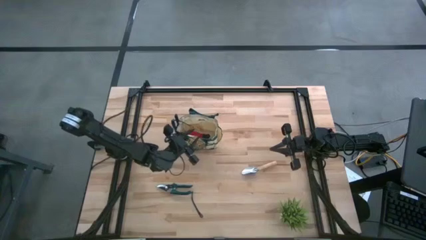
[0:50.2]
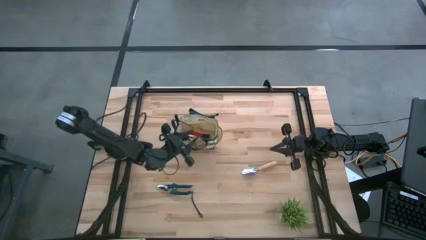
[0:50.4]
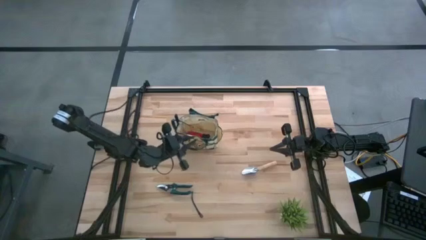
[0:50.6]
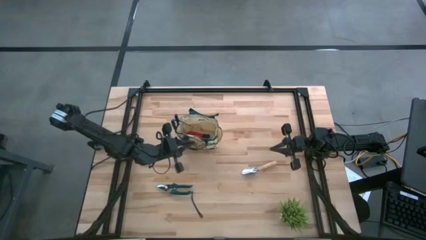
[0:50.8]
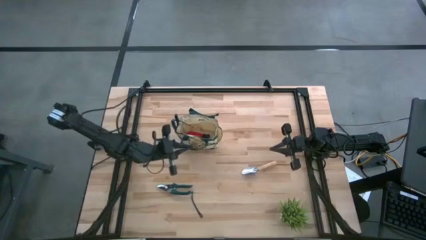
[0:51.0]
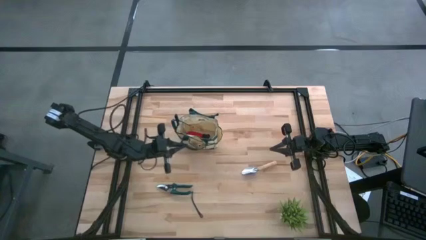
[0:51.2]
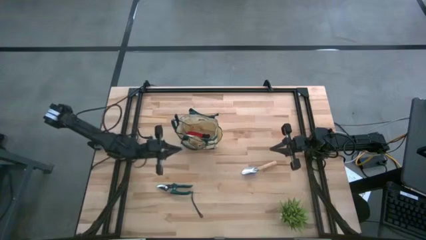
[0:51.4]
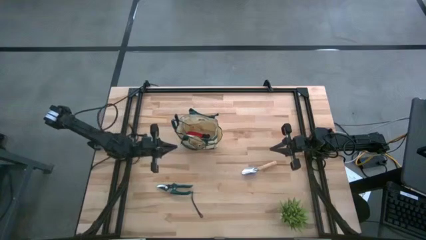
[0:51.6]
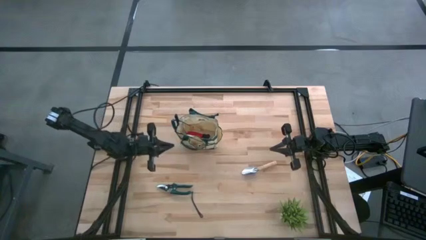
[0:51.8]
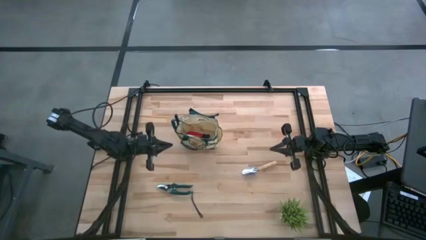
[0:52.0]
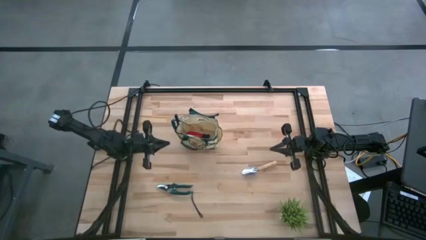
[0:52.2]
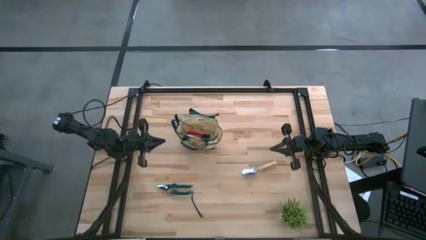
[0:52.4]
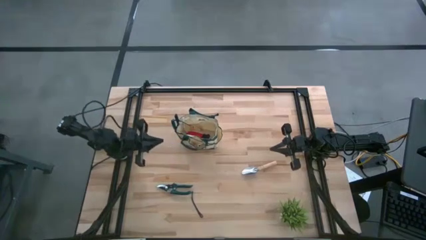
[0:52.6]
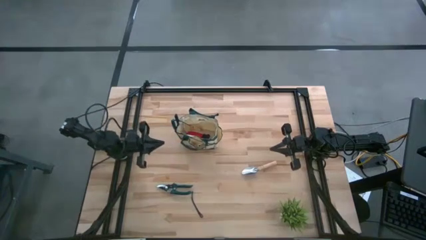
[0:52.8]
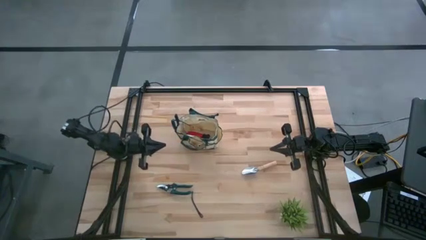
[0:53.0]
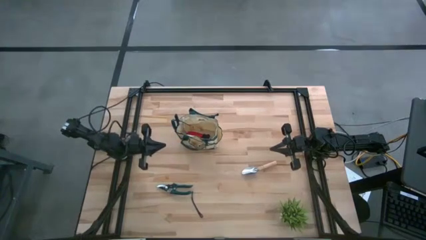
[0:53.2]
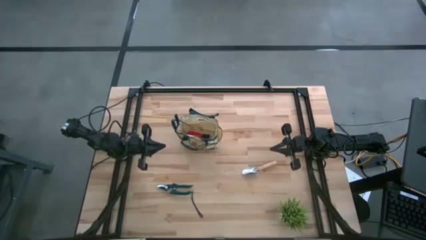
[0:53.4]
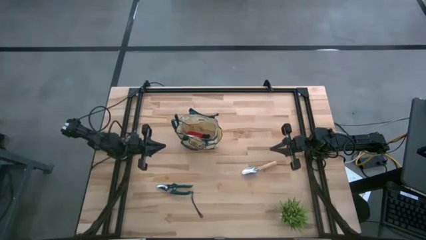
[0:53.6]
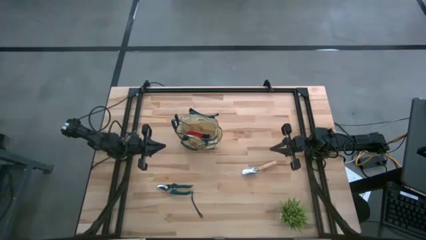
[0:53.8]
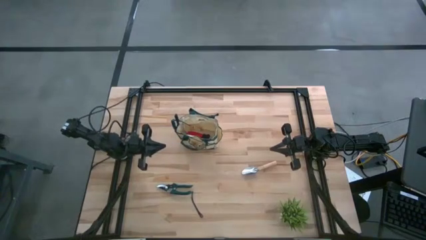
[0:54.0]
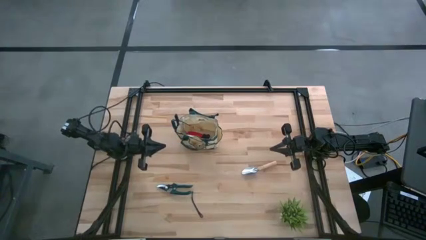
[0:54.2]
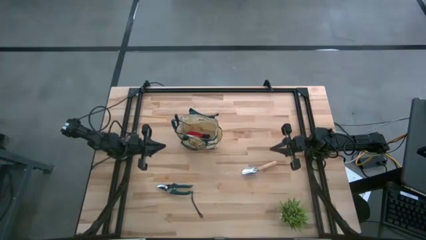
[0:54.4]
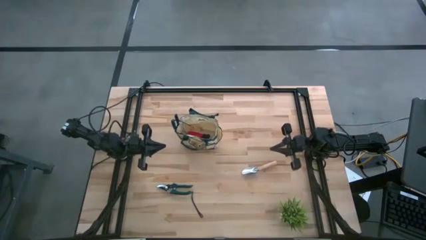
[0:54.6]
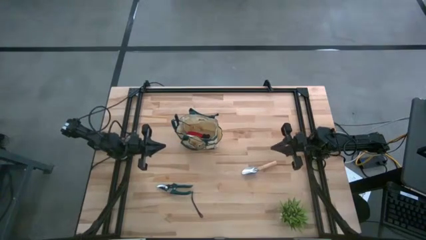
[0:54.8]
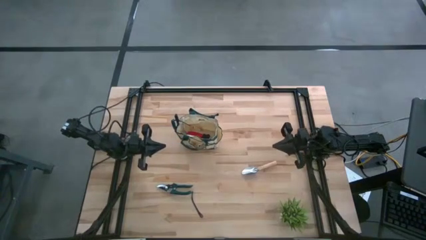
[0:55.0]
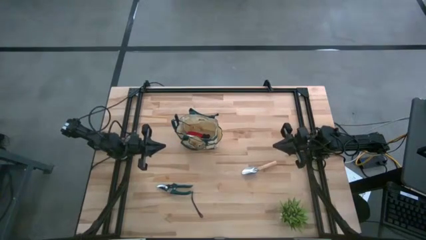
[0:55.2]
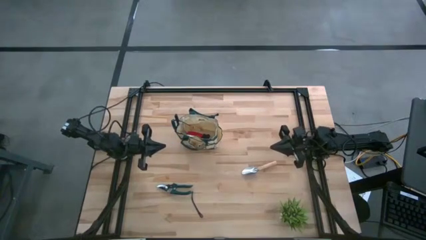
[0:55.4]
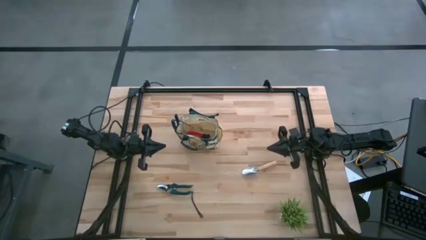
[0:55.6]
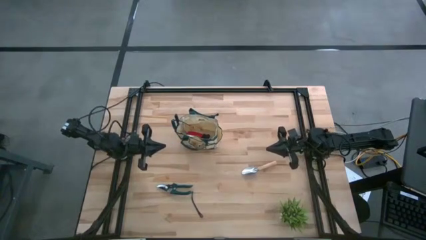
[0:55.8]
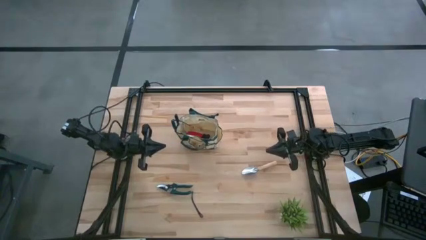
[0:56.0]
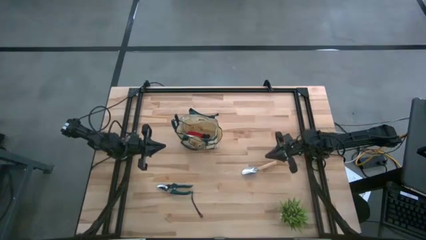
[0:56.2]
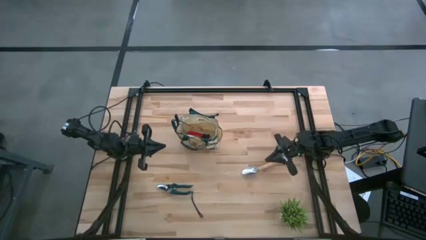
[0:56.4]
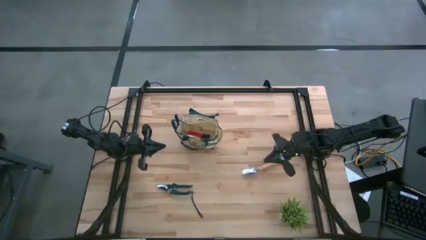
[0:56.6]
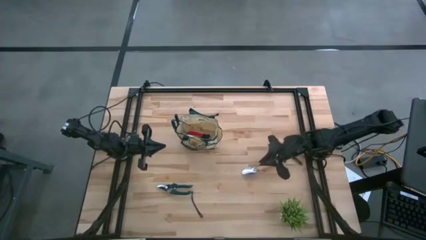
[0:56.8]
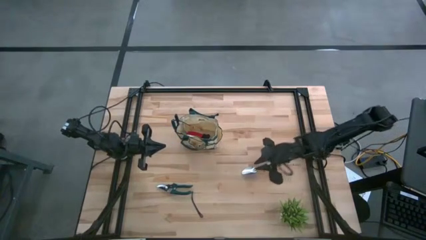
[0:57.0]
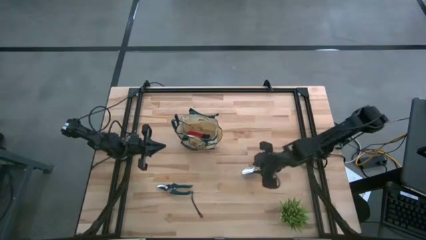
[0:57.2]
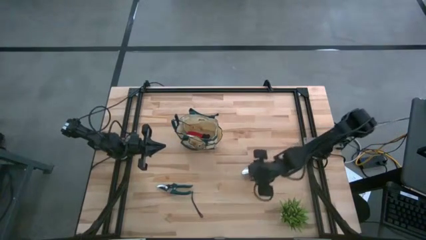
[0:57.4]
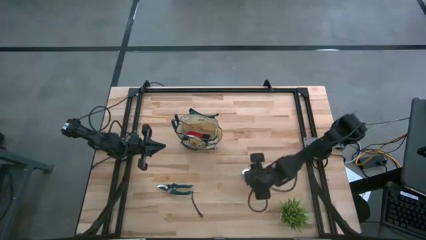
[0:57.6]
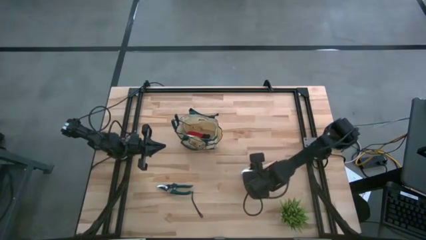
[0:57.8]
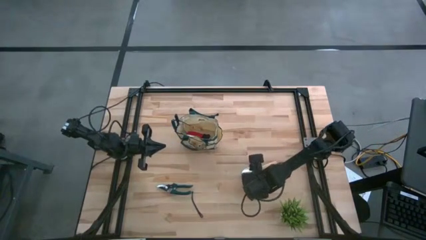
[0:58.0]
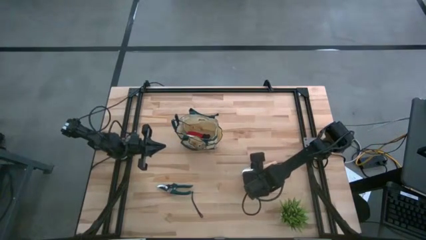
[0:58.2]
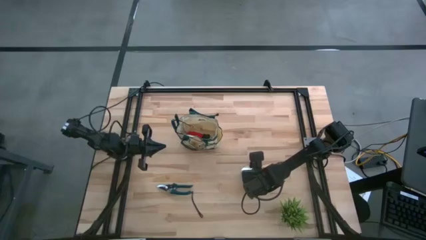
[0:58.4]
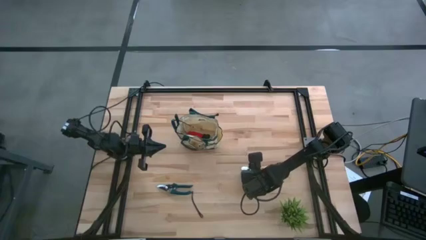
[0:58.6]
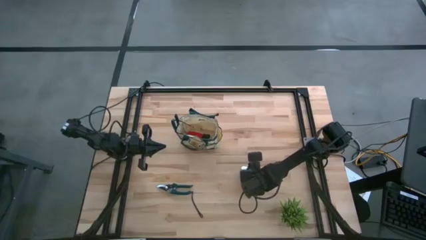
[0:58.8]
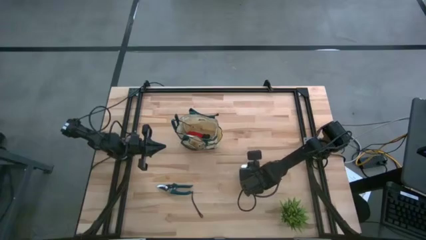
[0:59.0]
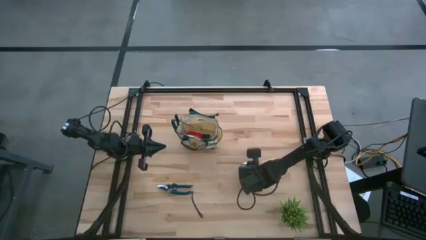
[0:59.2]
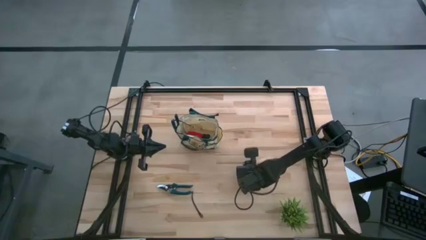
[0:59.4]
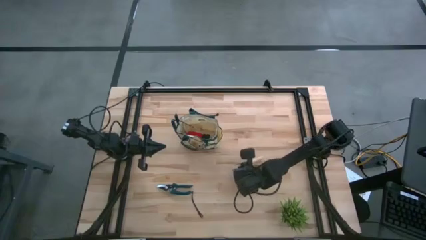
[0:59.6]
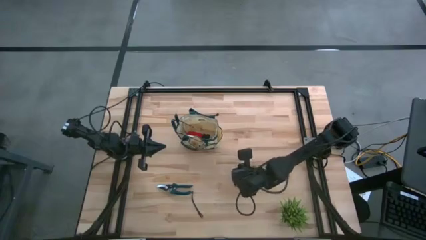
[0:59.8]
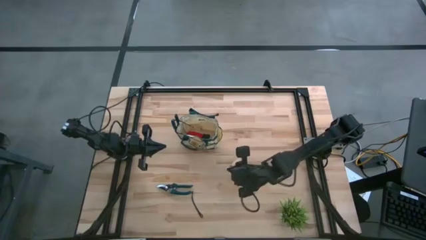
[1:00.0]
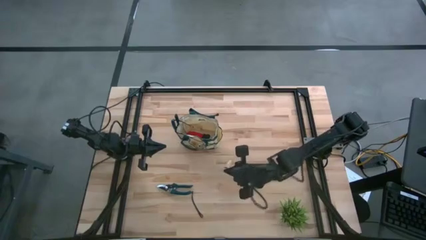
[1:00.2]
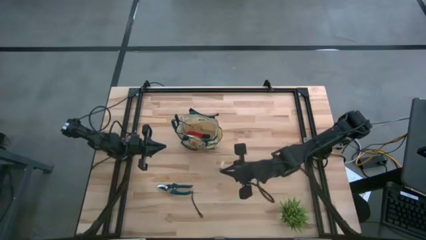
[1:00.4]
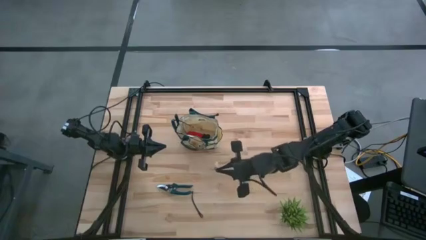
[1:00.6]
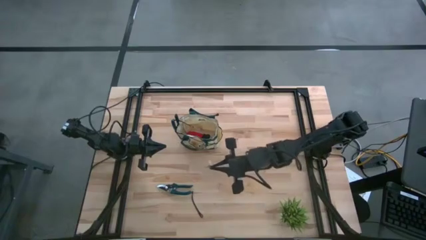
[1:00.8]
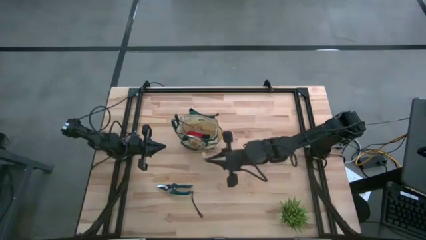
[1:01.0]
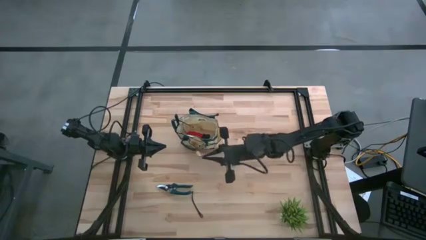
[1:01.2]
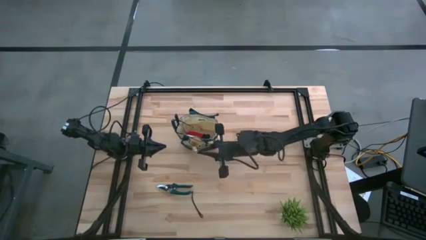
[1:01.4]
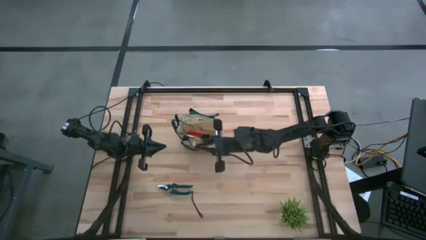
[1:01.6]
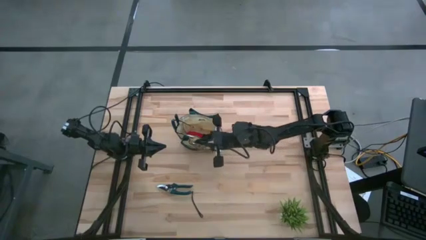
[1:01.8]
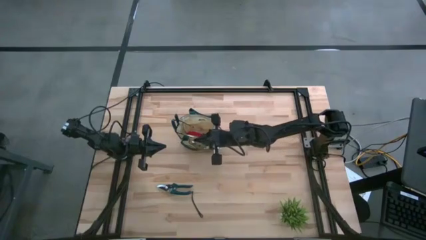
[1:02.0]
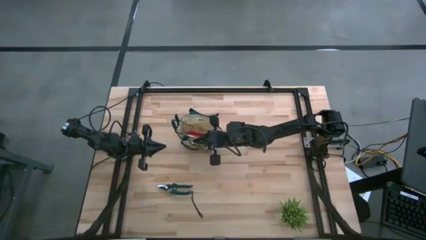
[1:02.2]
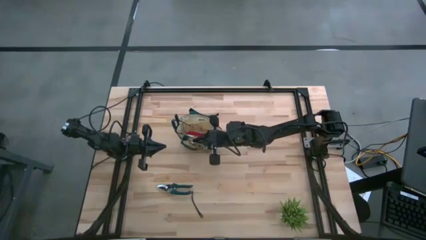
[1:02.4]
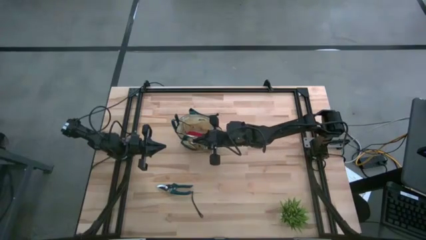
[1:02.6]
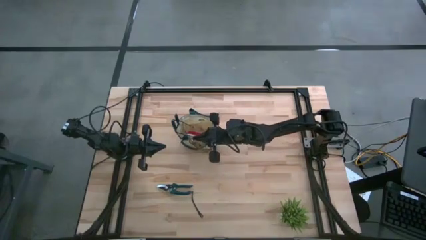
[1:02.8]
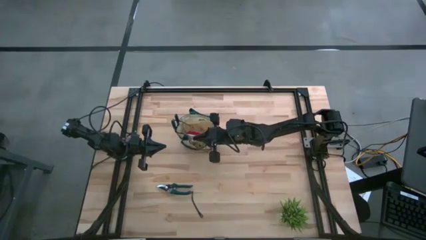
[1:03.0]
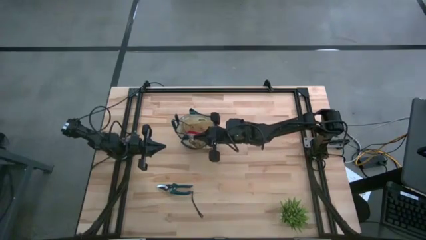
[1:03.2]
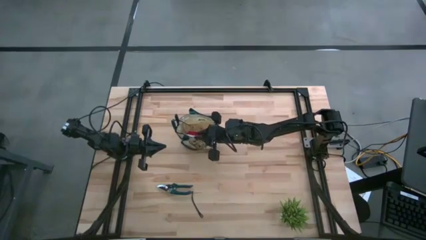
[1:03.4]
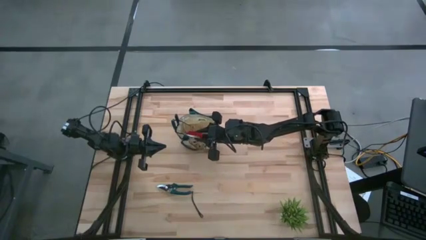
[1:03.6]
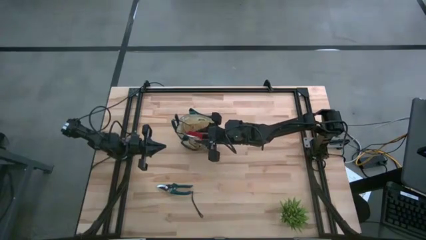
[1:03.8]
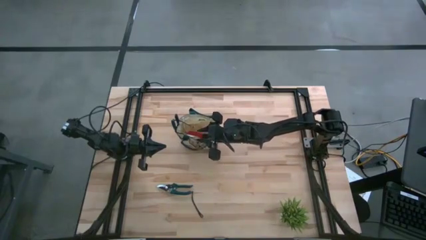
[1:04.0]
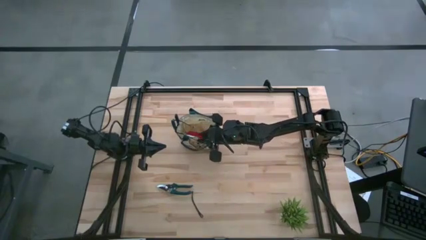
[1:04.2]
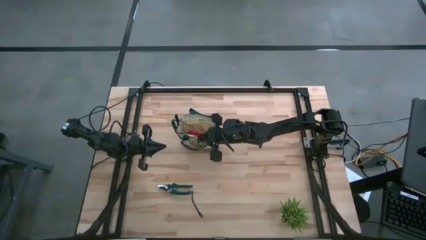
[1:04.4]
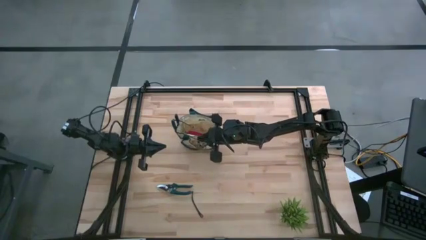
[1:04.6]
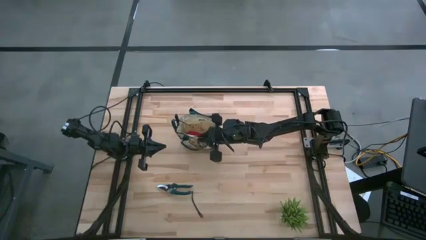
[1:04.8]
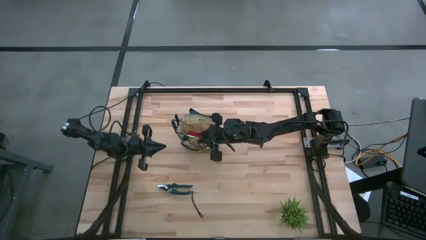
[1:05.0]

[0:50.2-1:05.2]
Task: Pick & Place Garden tools in Gardening bag
Put the trowel into the gardening bag
